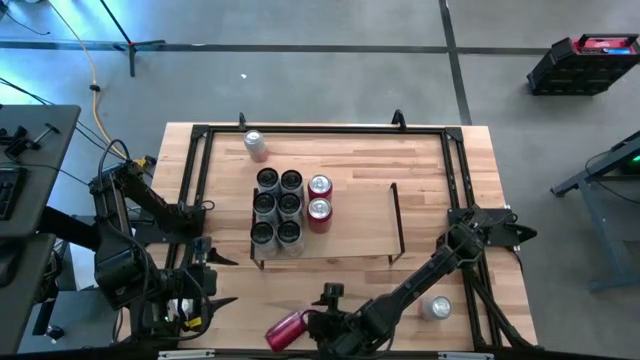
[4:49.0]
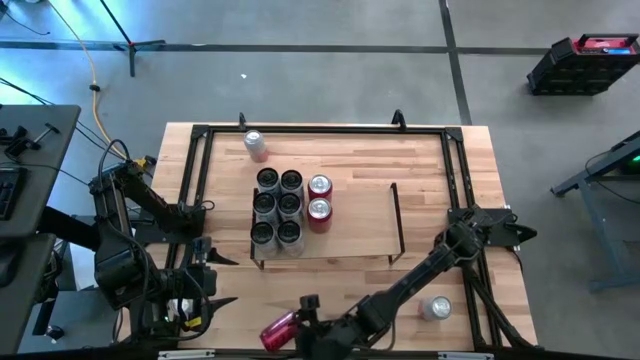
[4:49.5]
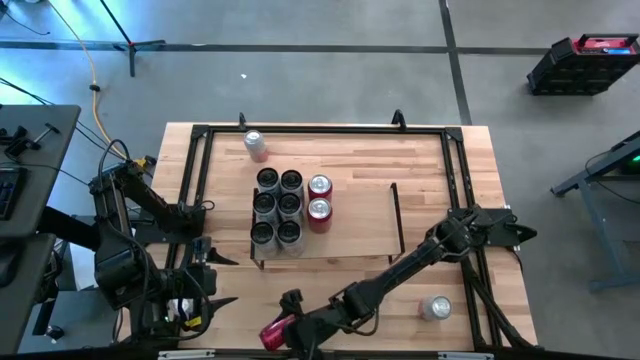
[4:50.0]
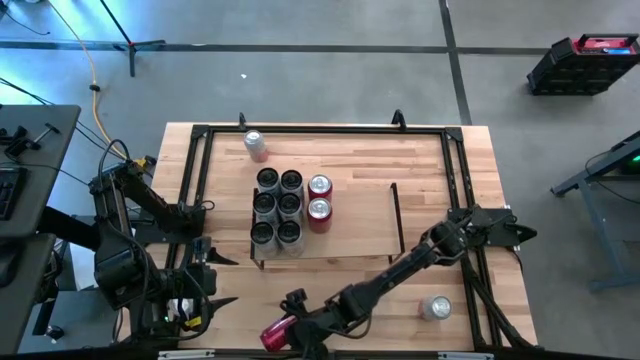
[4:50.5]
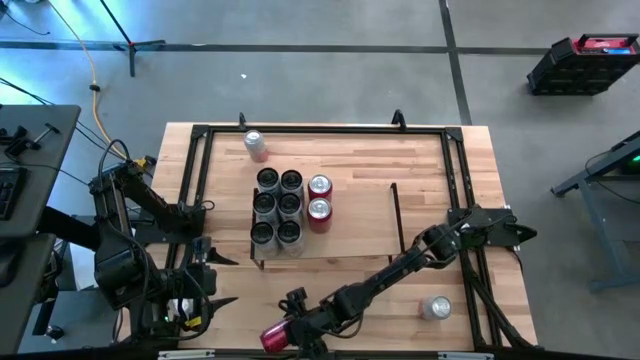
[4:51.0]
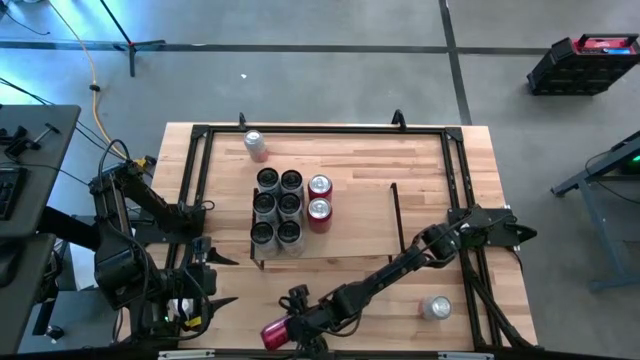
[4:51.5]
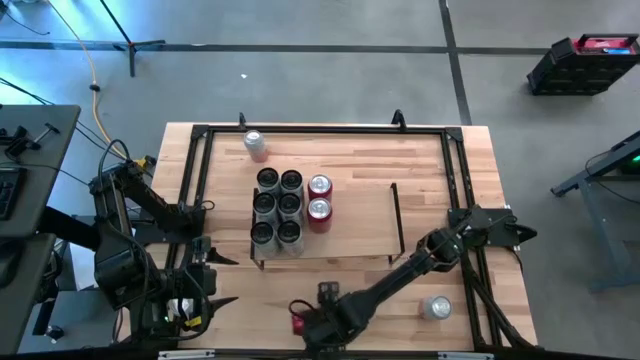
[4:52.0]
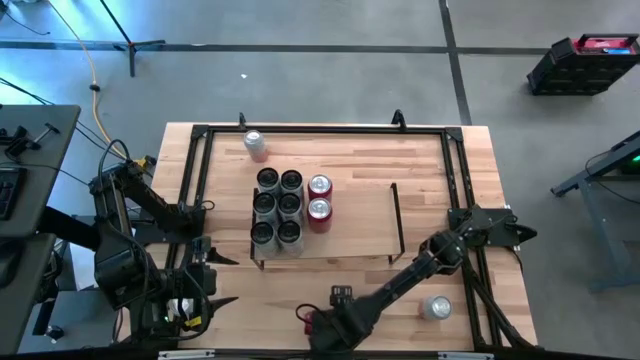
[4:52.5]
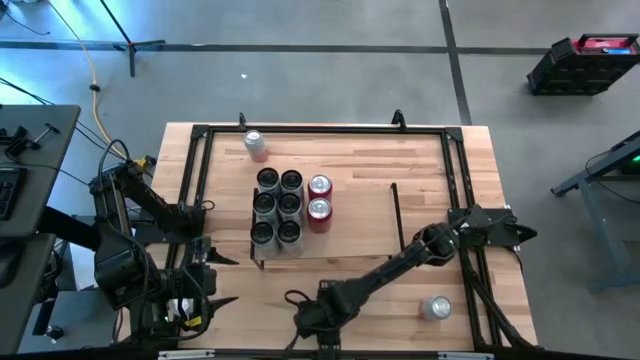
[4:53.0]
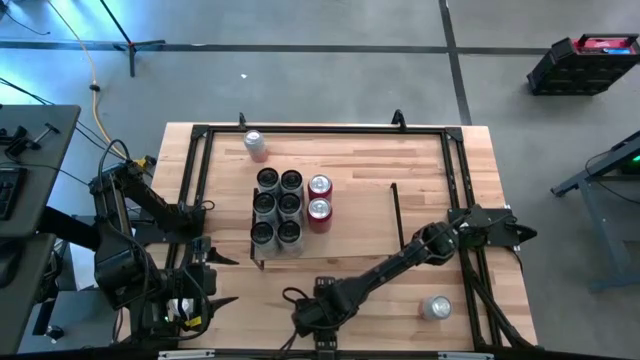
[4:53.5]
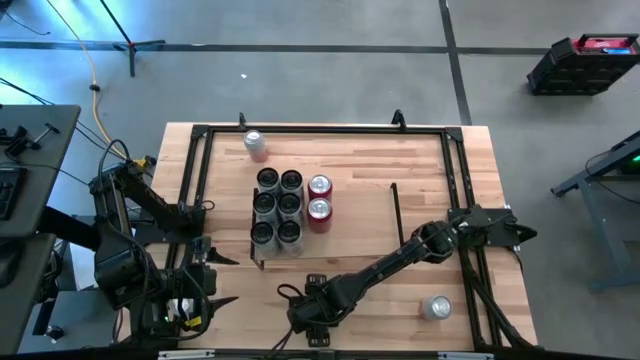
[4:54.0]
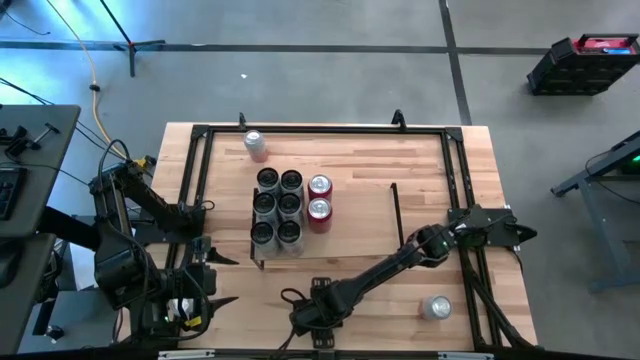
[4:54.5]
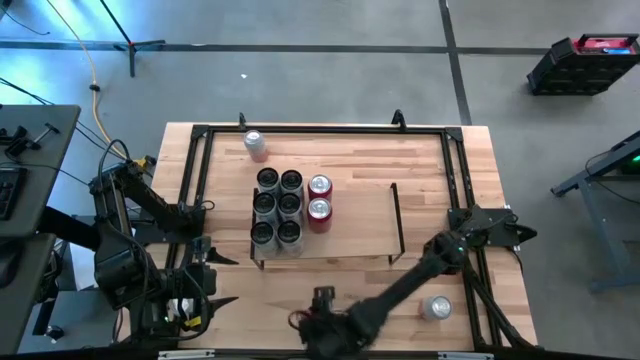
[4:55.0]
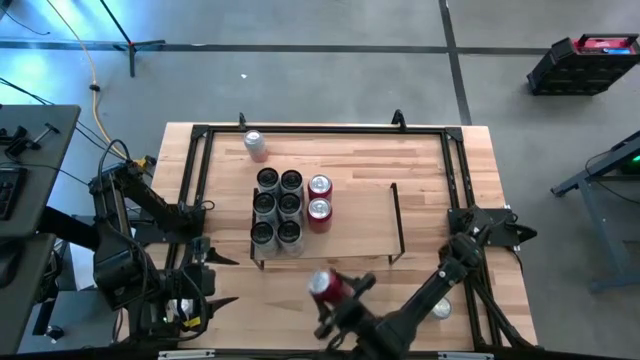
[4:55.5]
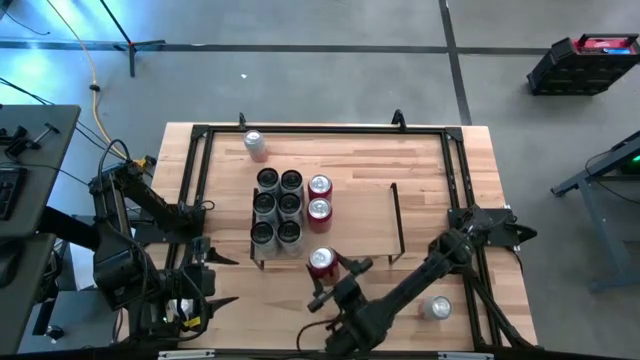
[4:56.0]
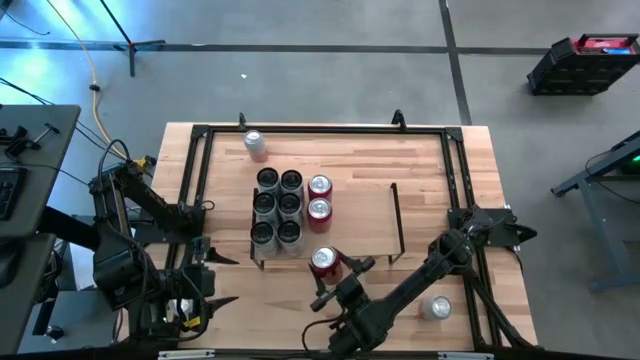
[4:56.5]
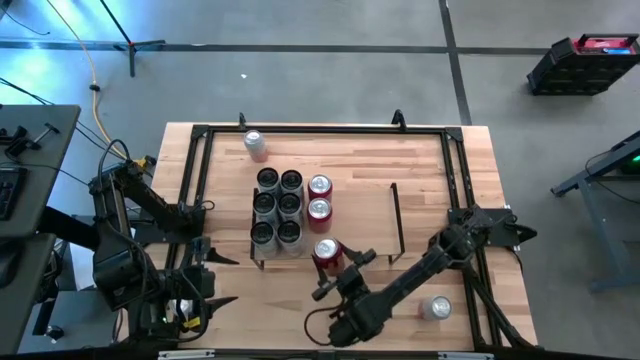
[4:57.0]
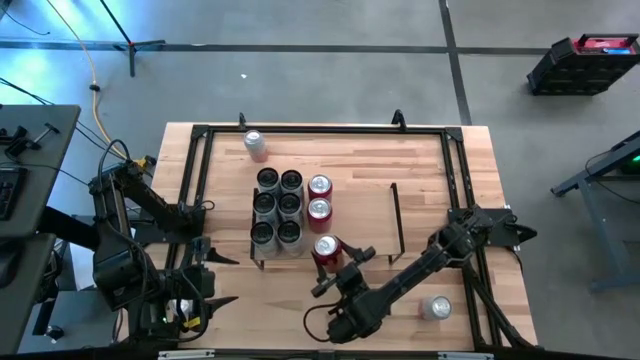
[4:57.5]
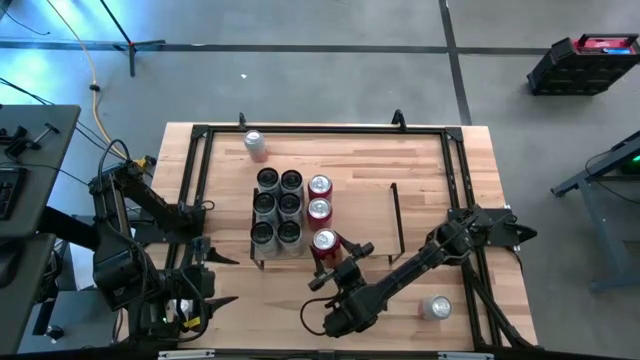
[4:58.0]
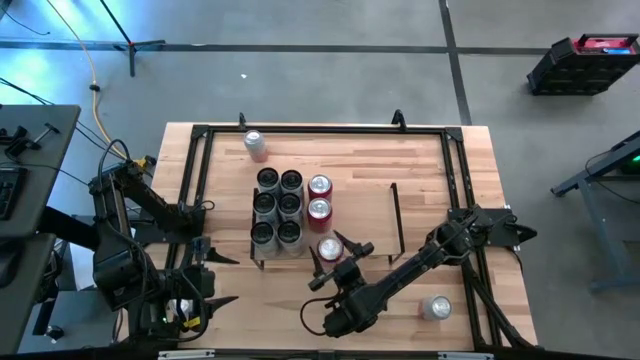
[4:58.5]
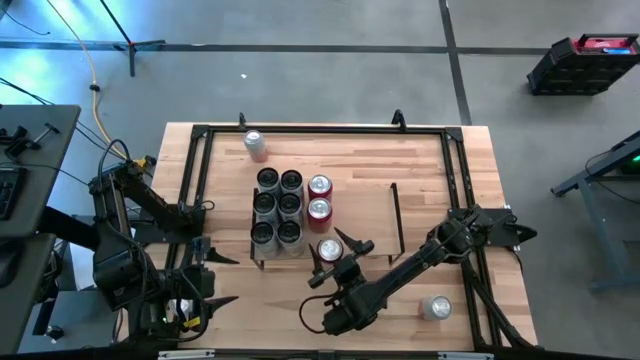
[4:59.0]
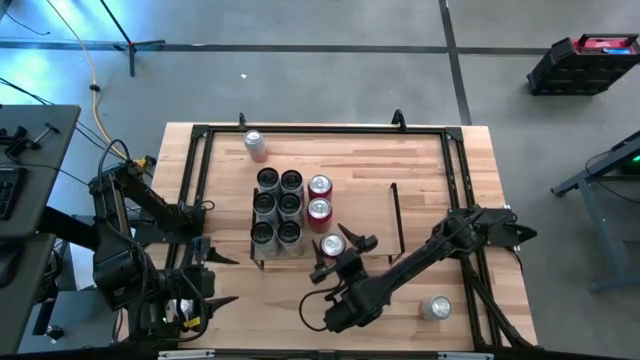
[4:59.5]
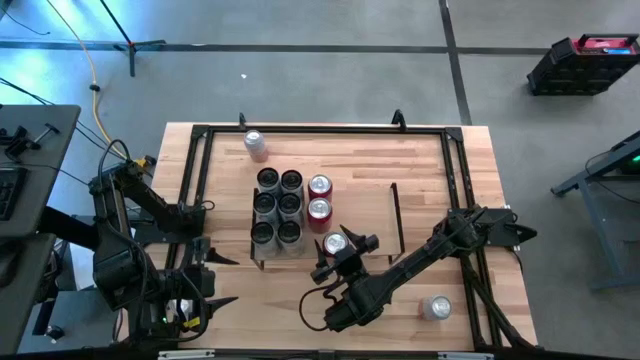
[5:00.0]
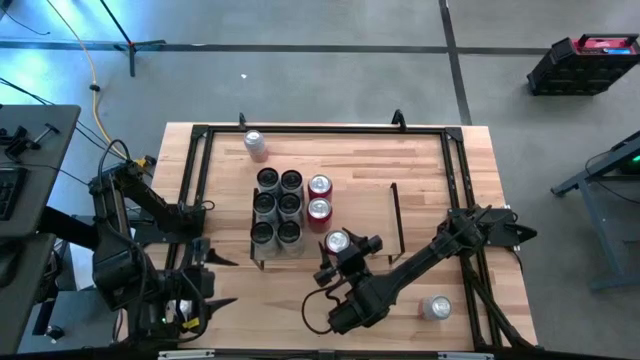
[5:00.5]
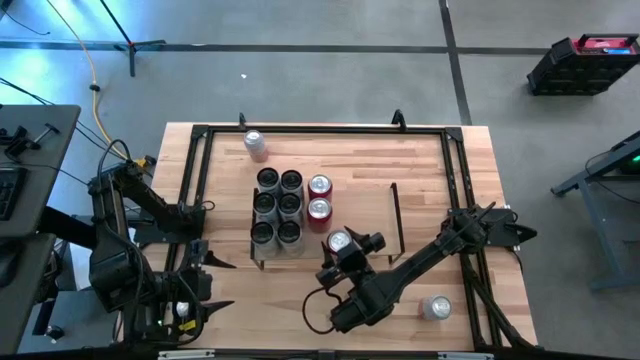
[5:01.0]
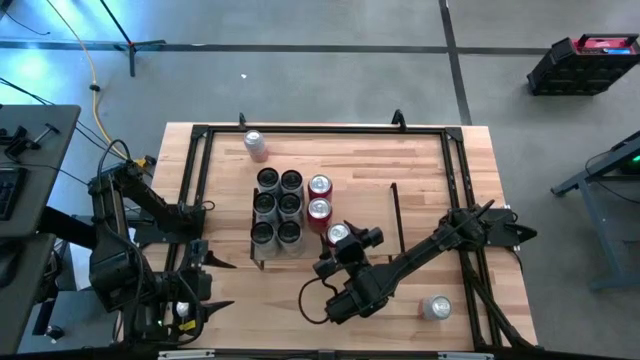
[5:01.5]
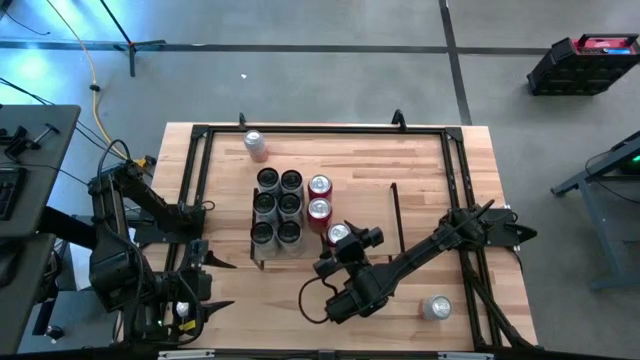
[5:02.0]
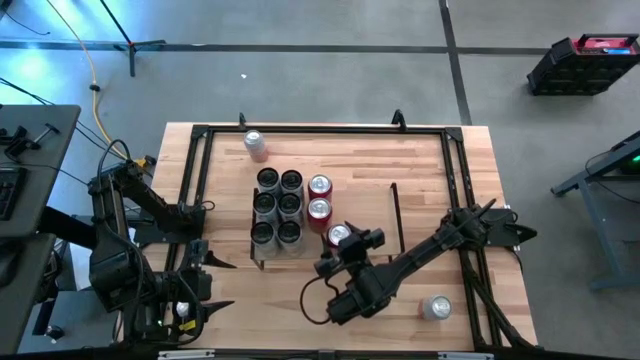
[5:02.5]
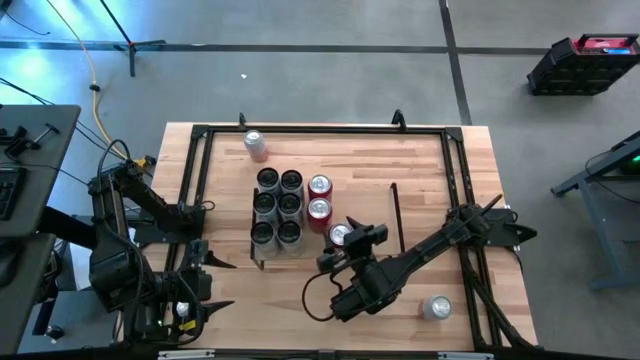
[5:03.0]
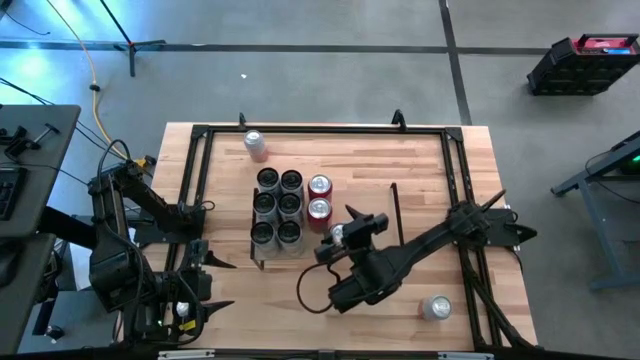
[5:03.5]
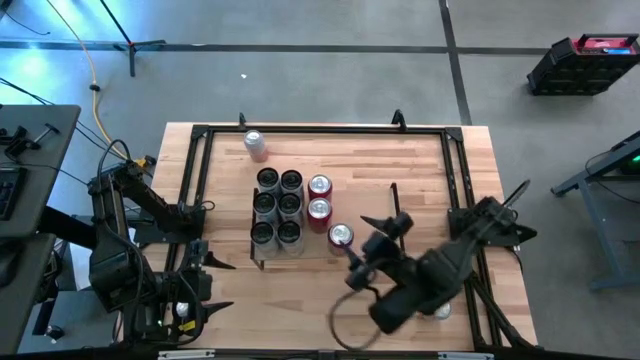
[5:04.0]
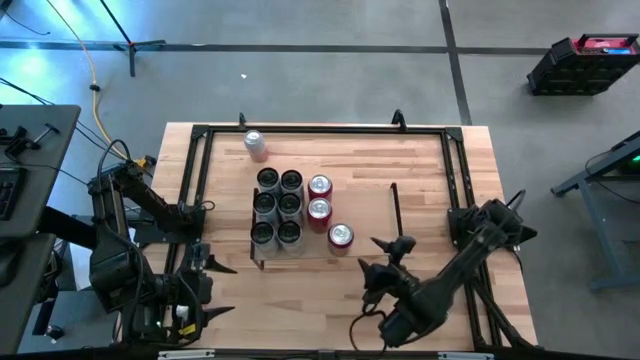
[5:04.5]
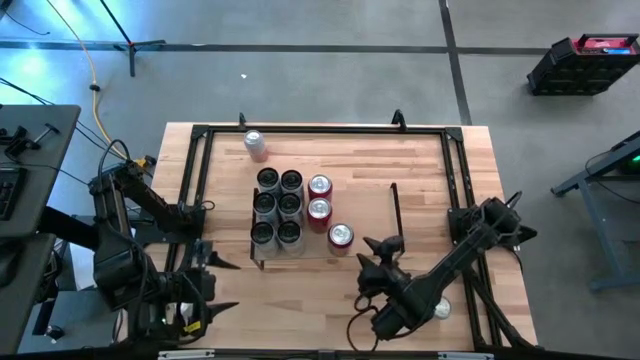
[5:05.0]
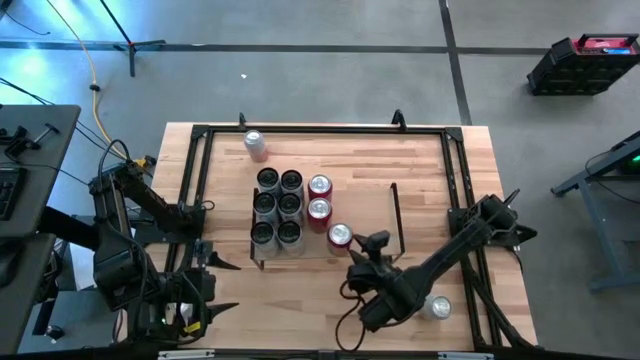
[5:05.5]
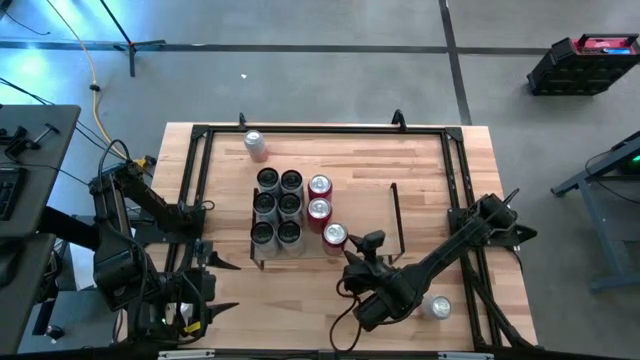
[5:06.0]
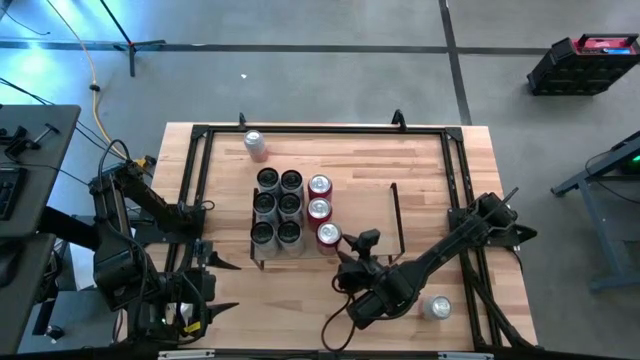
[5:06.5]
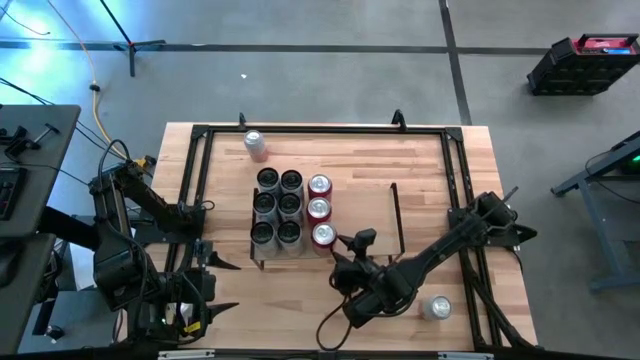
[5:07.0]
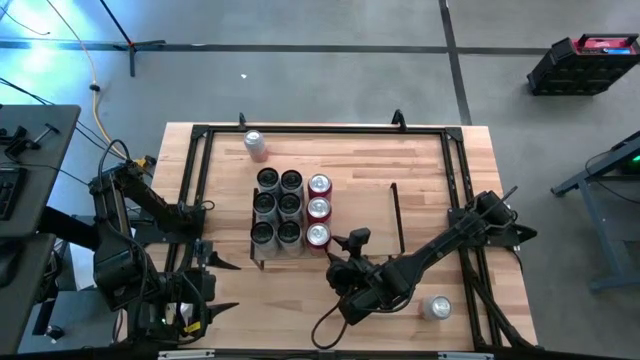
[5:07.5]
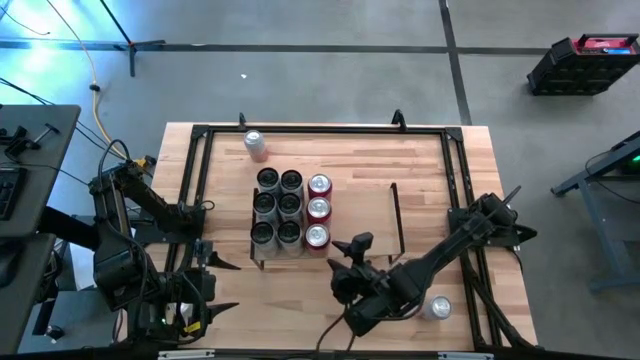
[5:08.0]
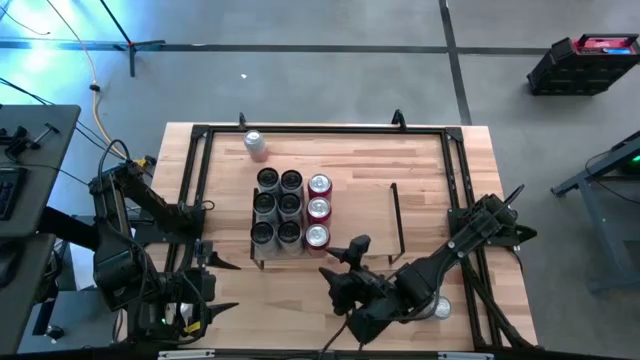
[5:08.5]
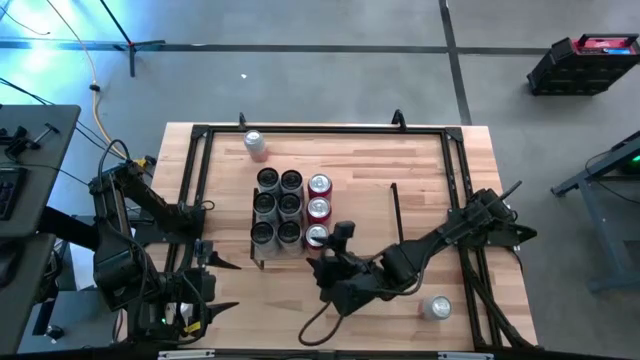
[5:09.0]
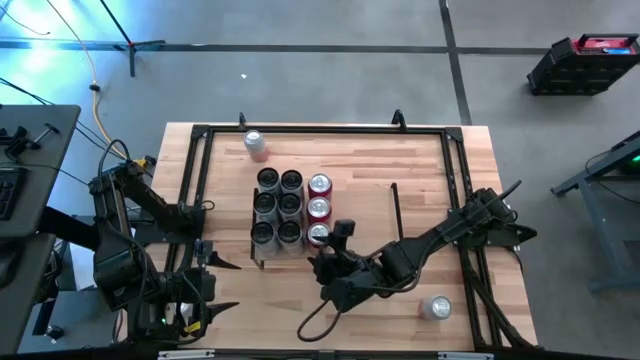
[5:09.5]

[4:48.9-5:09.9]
Task: Place canned beverage on shelf
Put the red soda can aligned with the other red soda cans on the shelf

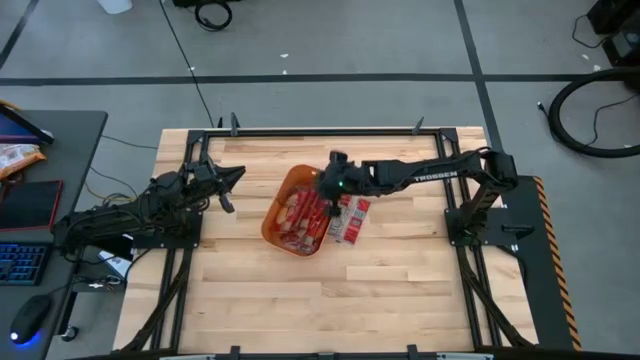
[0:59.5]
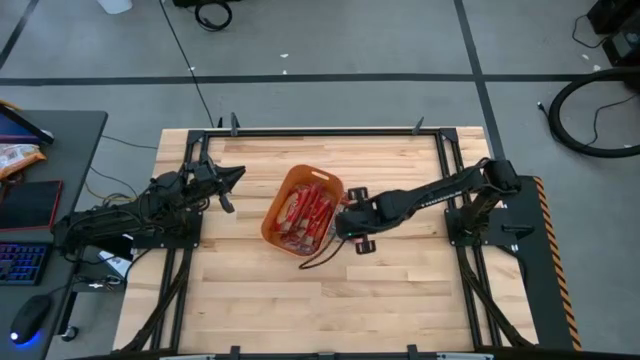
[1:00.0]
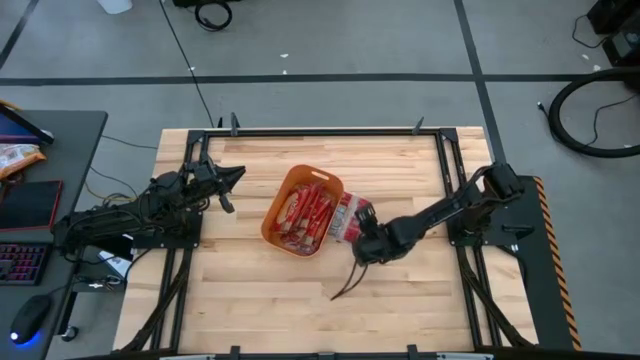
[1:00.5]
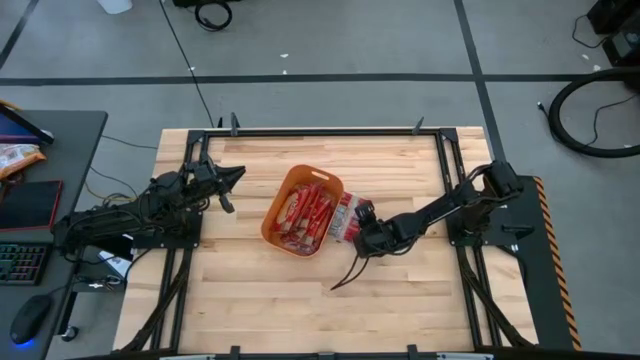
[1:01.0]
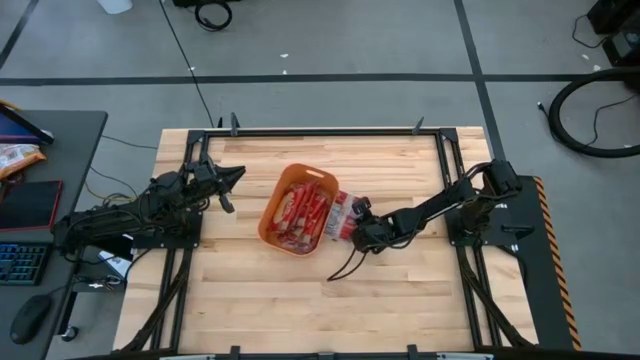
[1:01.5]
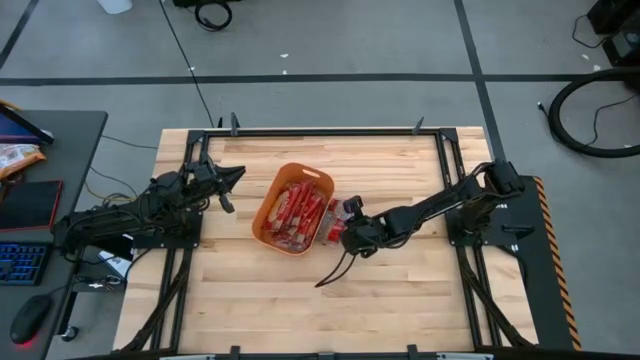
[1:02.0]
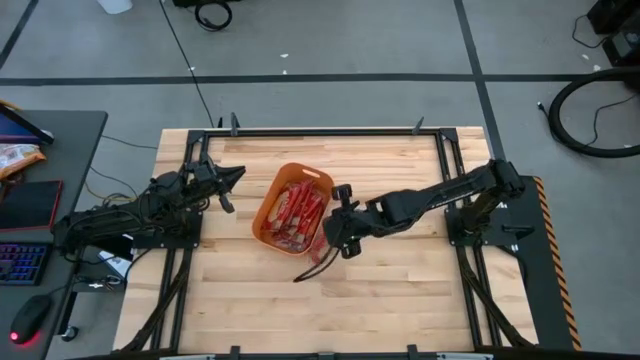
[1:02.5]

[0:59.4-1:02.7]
Task: Sort popcorn bags into baskets
Put the red popcorn pack into the orange bin
